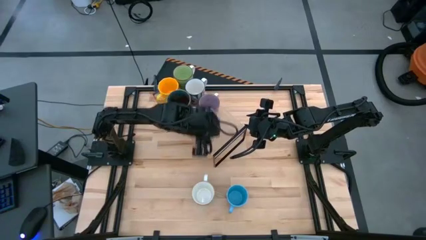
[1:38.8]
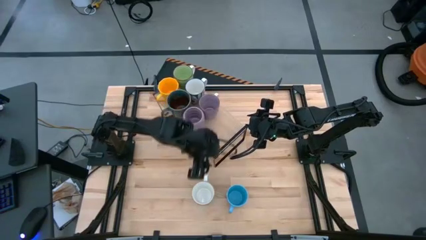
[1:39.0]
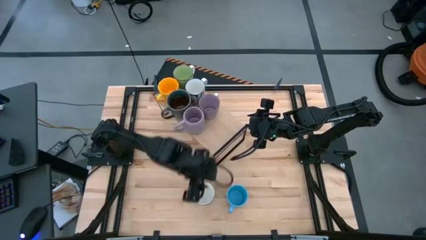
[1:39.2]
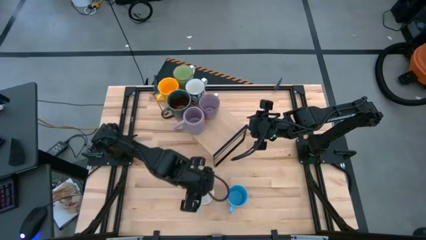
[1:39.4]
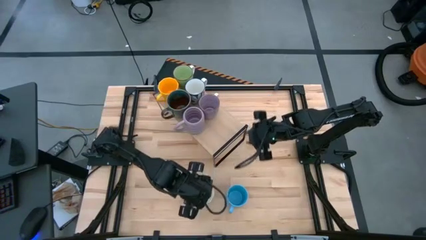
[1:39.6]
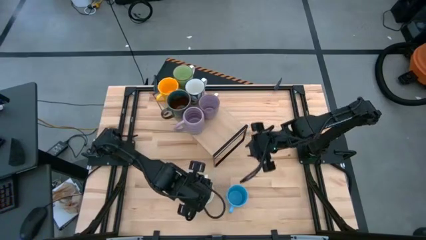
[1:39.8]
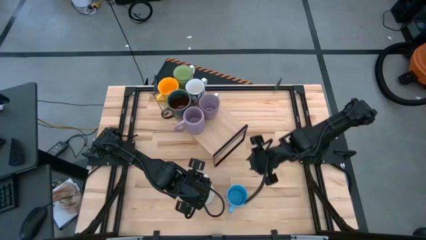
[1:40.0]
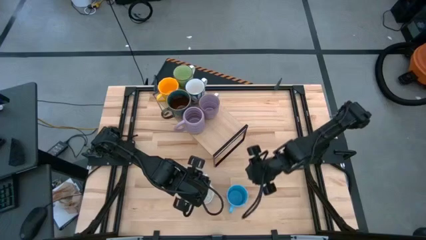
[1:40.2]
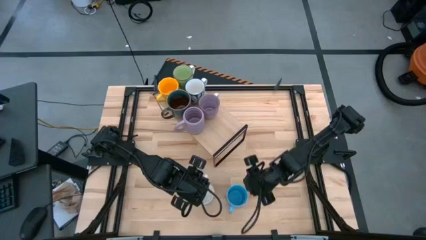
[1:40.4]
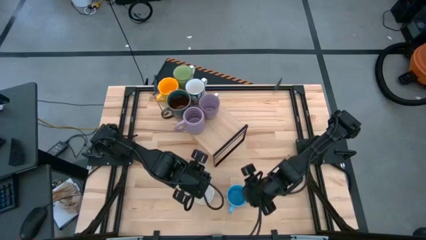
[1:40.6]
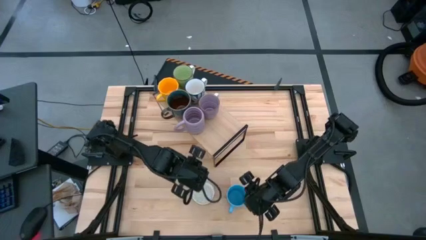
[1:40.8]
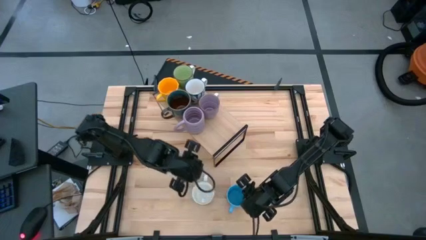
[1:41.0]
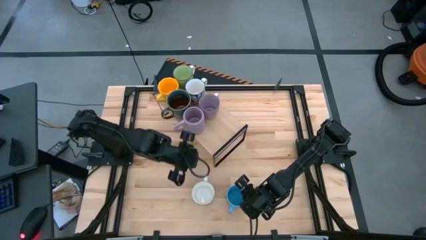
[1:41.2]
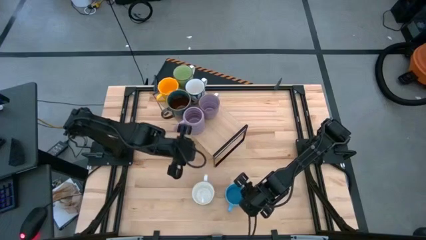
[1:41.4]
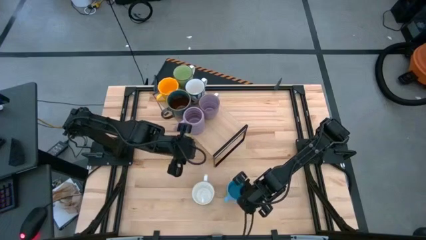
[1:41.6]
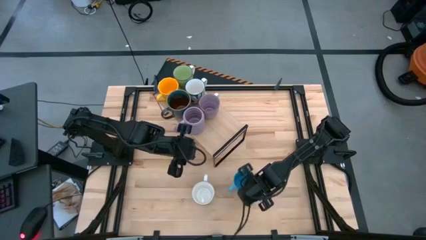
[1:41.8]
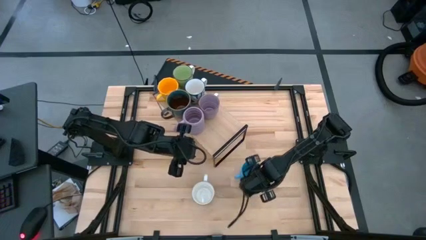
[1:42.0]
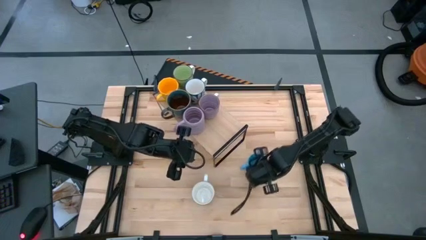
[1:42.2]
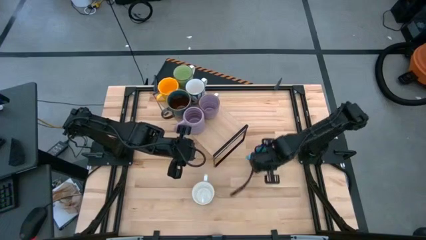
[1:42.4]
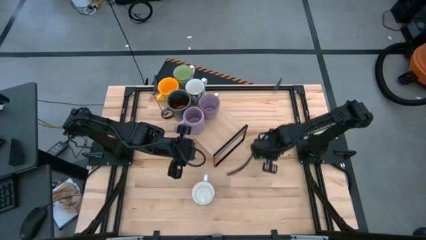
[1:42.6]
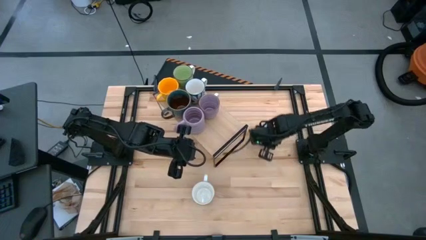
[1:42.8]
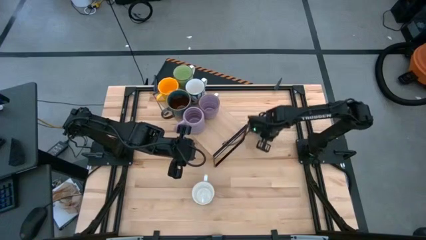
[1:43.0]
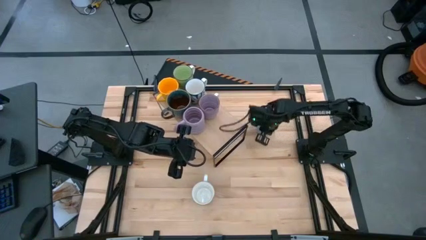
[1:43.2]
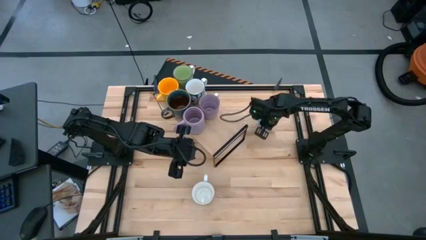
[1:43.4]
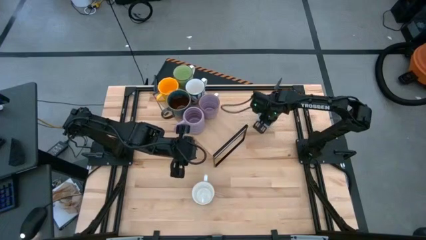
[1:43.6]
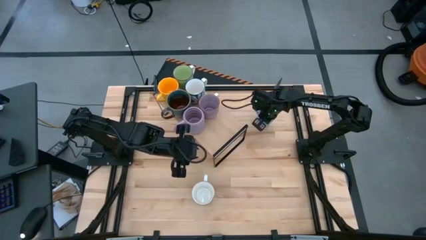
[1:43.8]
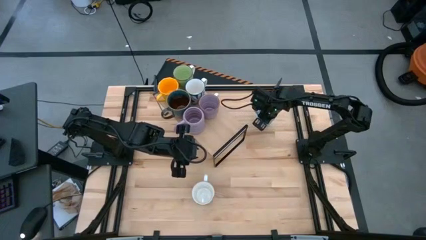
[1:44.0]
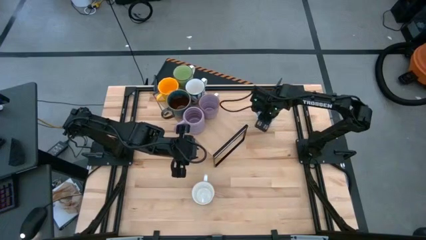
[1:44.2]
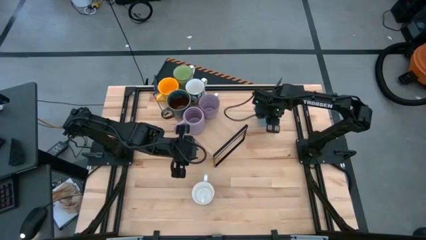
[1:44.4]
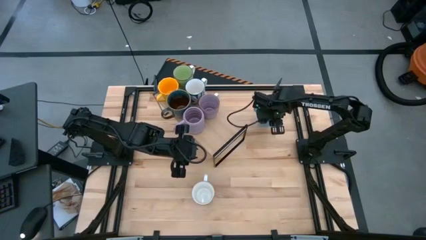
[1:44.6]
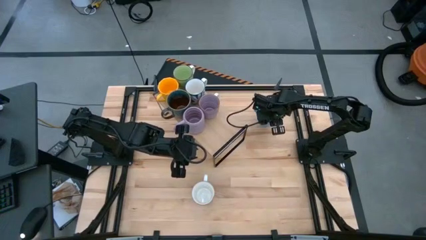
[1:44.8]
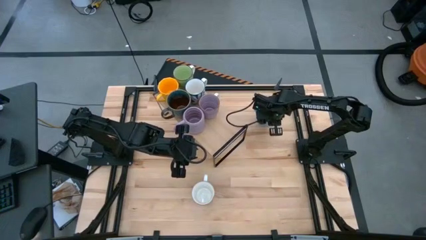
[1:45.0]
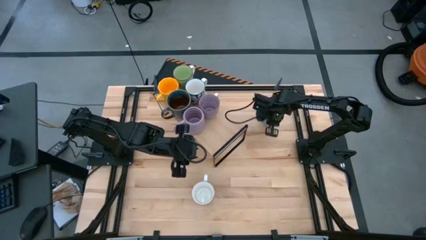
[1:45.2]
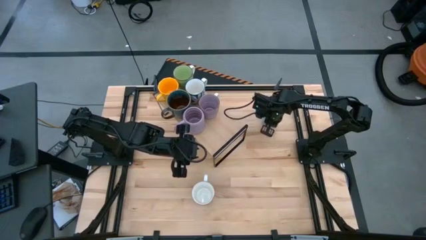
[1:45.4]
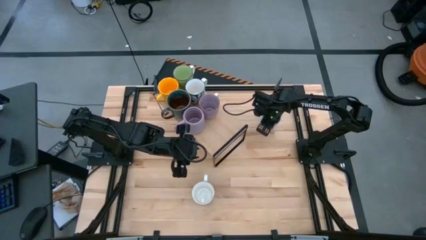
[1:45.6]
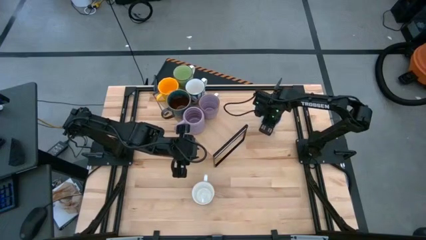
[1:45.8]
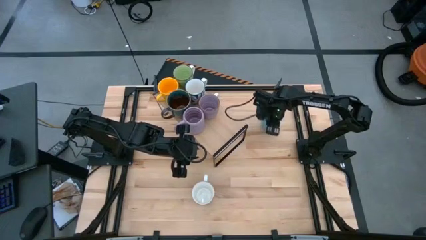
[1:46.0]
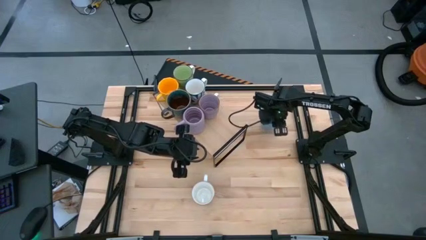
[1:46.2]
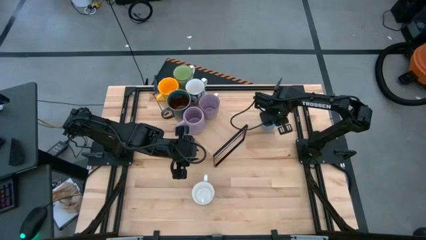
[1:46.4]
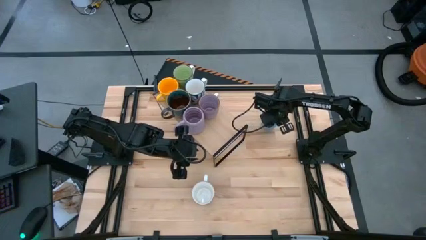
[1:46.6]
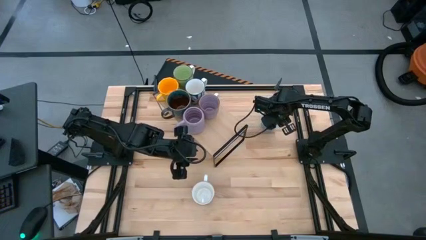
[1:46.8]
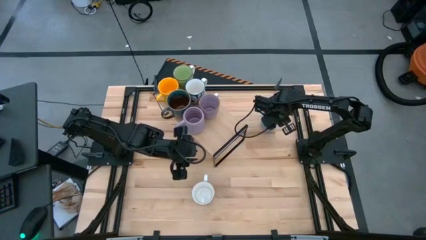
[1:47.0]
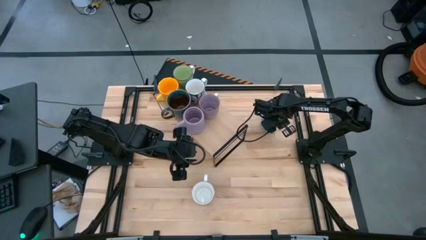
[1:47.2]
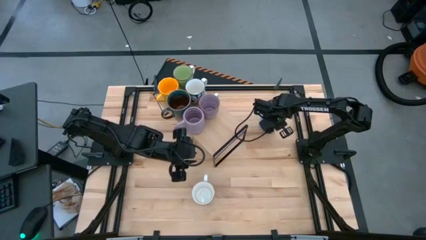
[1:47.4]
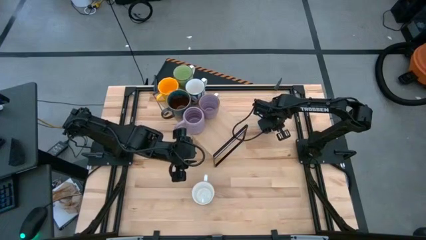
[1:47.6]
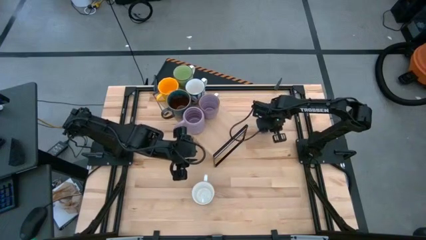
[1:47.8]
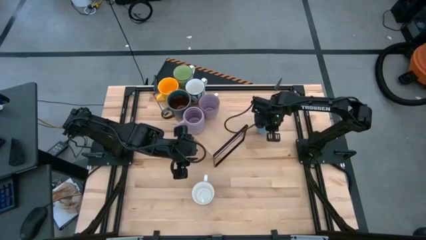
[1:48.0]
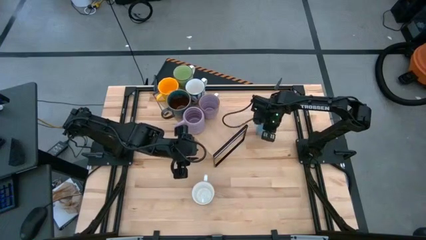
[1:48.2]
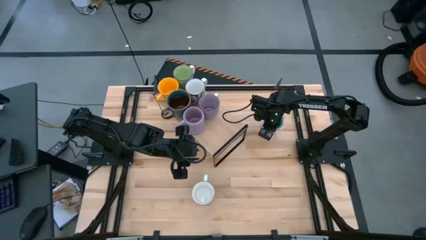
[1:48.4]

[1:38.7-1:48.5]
Task: Place coffee mugs
Put the blue mug on the shelf

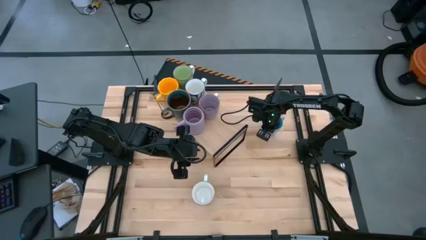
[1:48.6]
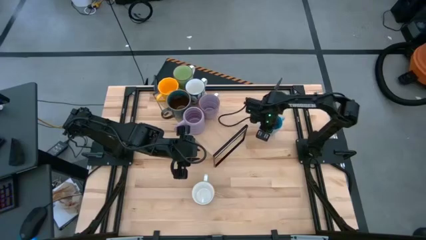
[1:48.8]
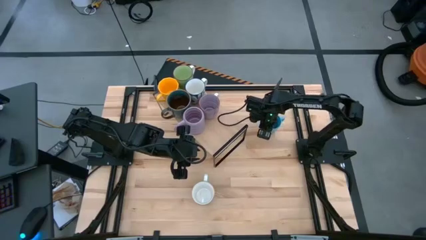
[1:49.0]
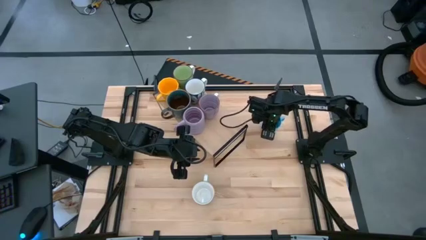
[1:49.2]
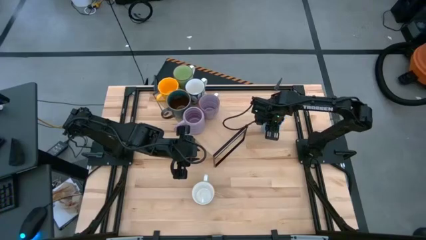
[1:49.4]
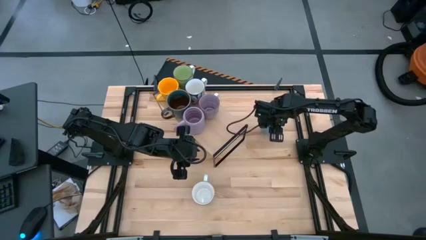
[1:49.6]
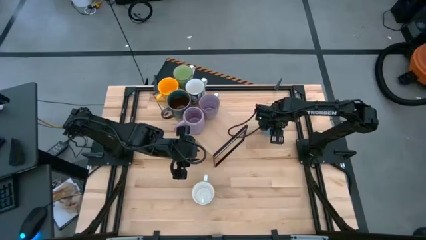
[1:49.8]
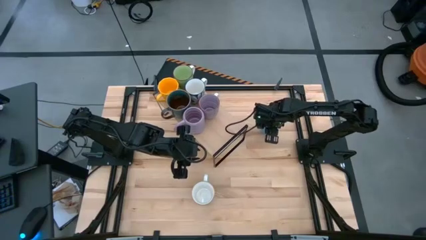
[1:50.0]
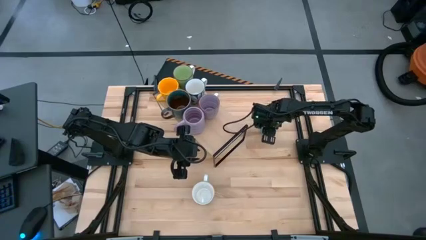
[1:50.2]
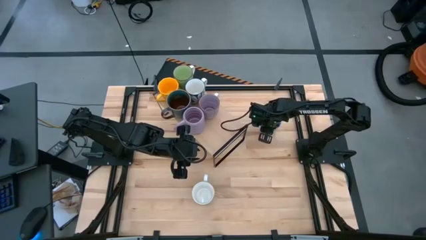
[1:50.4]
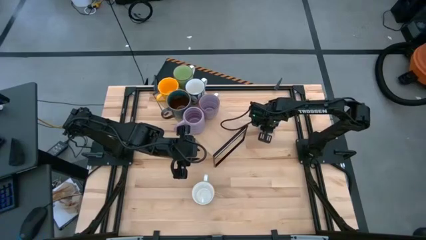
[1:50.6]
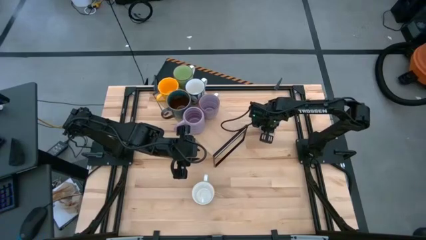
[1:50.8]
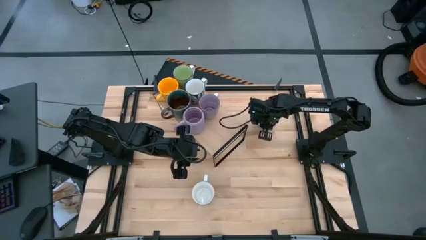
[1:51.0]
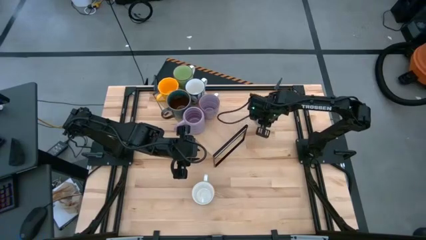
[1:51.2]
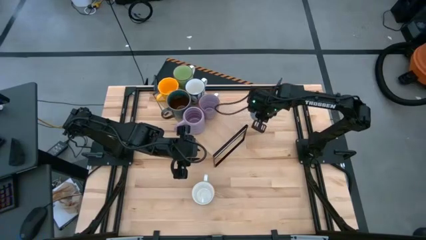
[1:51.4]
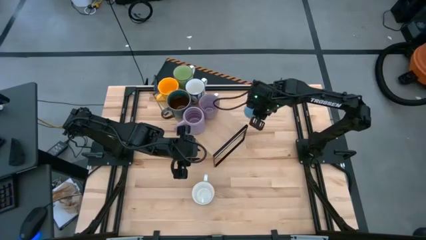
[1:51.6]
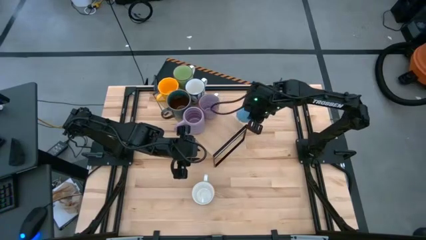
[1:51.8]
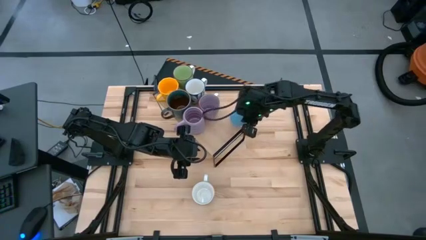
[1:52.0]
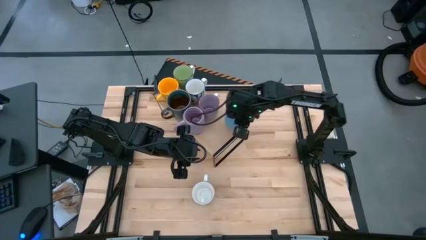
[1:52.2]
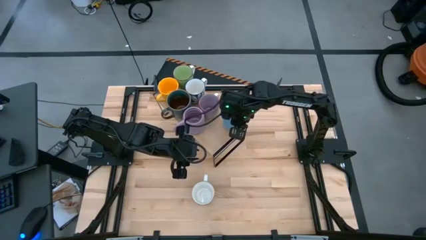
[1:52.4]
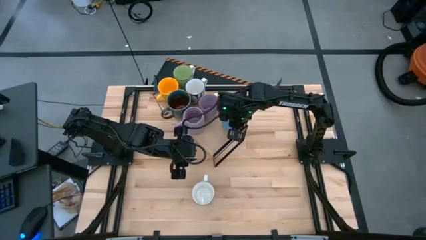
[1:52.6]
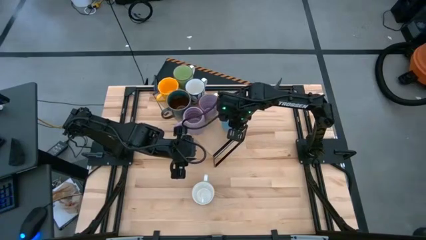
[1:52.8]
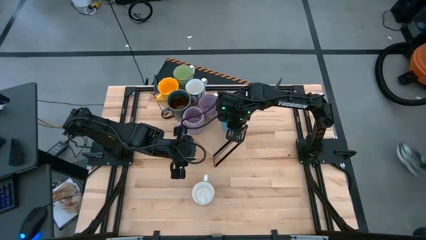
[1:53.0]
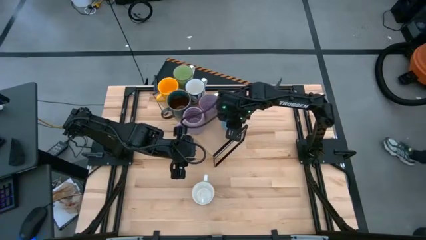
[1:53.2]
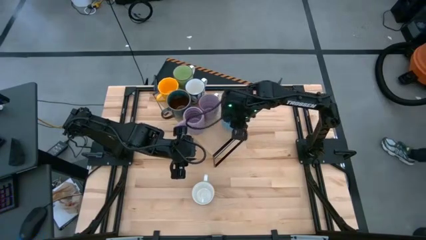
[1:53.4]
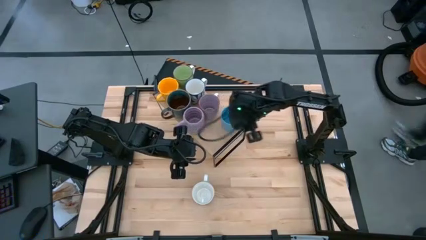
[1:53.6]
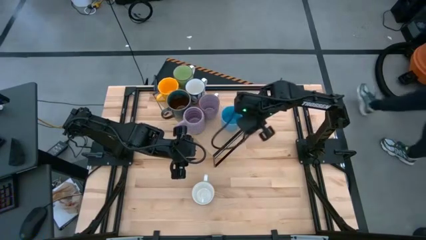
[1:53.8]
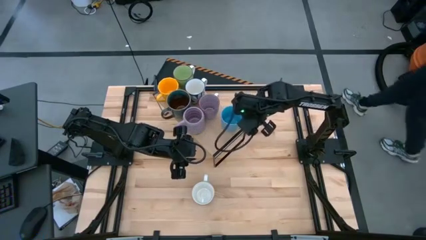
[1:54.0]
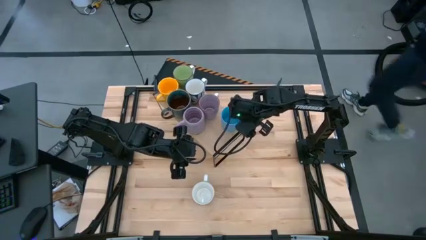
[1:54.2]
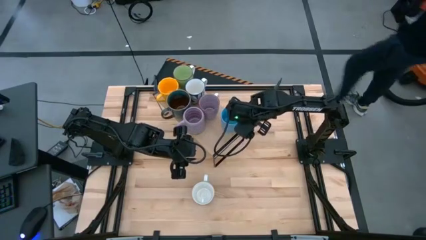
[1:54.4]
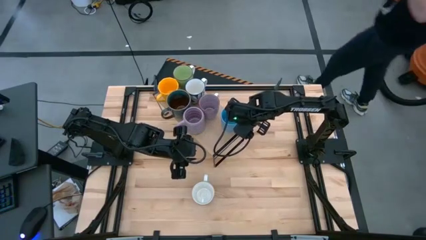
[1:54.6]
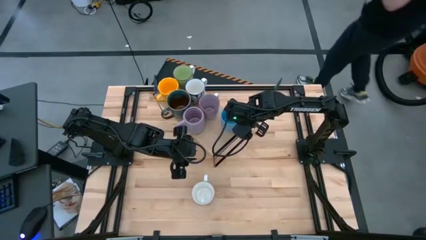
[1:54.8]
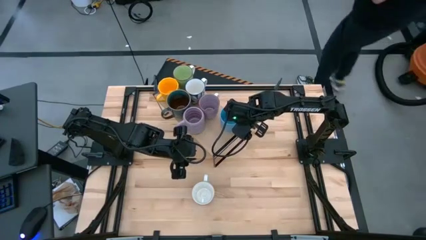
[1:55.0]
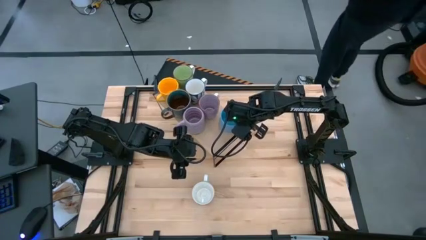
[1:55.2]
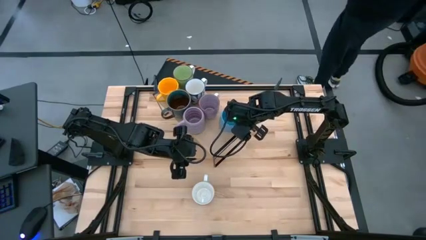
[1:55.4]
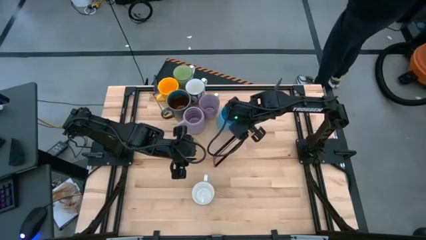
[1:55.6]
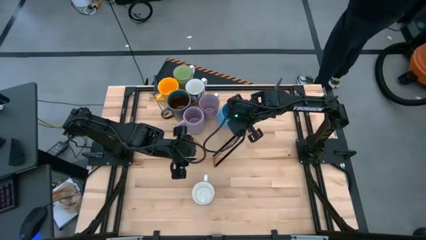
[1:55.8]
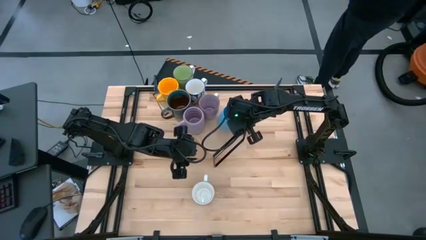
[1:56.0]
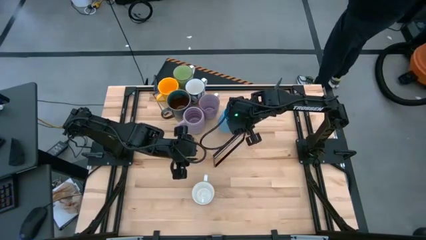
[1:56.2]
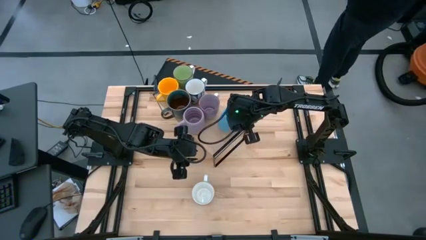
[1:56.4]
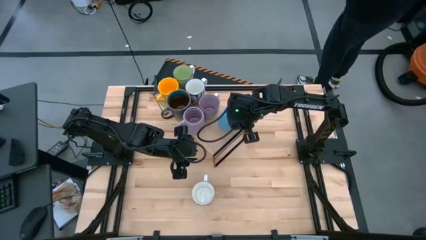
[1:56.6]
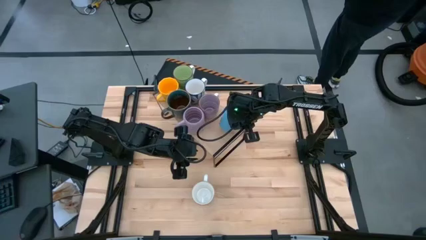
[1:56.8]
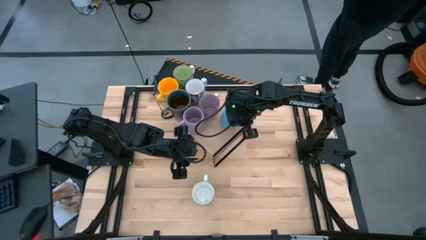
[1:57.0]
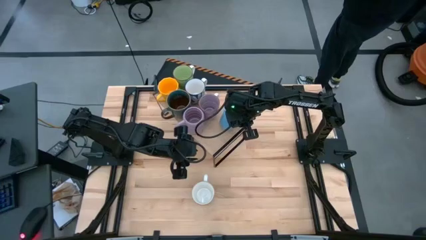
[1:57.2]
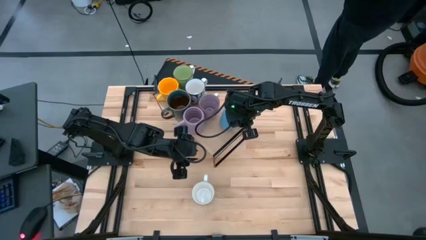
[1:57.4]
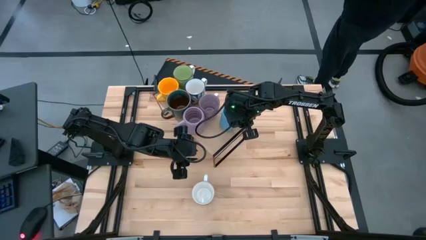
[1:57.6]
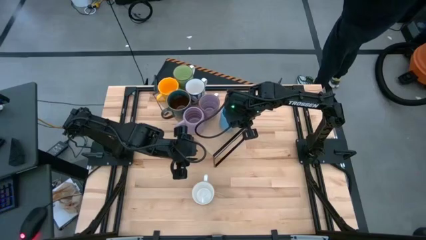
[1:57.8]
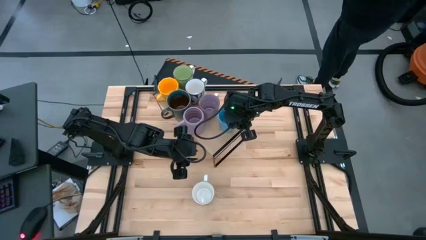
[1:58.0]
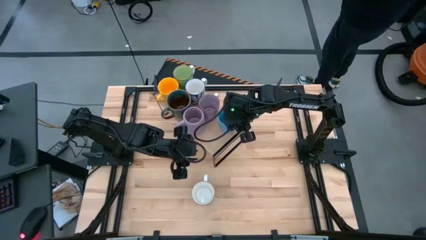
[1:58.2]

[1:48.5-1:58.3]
Put the blue mug on the shelf
